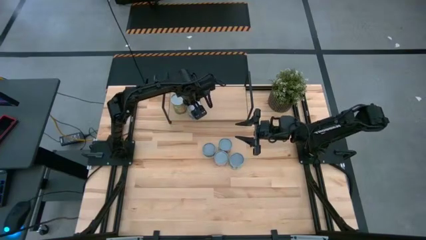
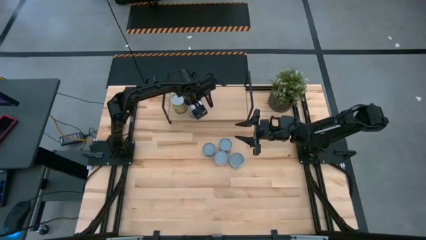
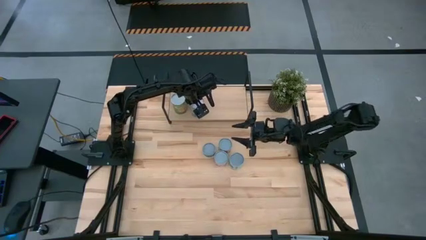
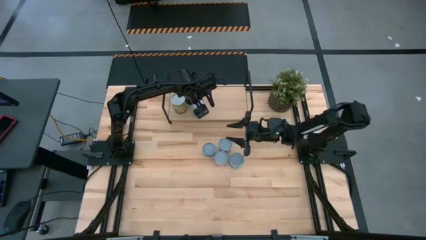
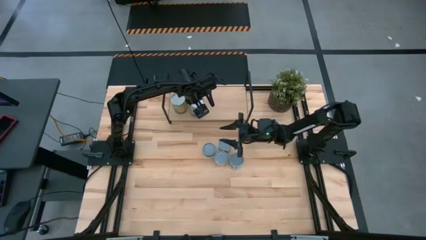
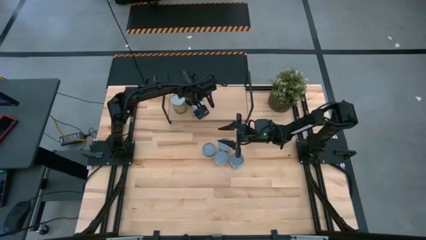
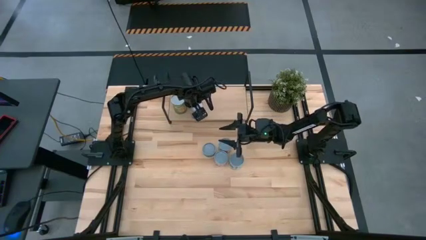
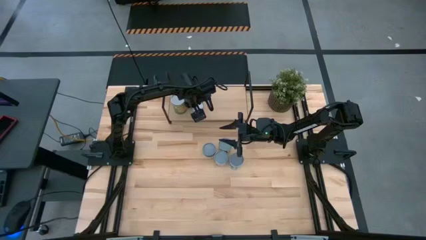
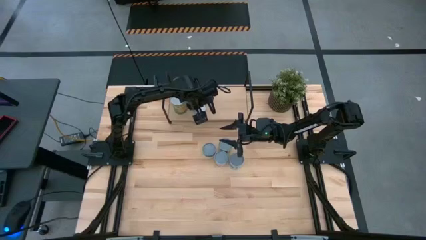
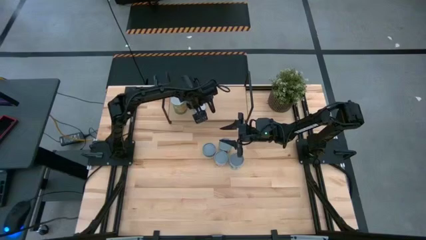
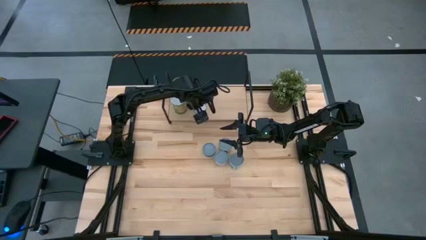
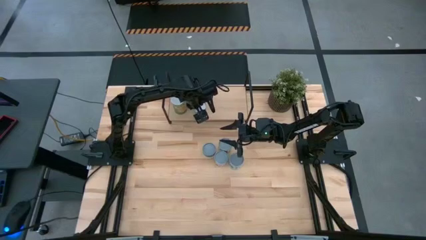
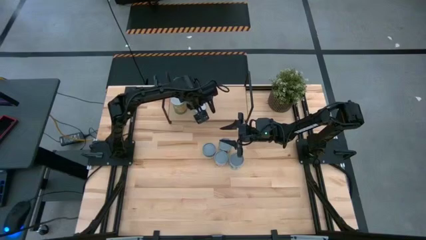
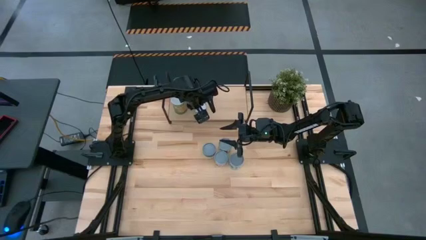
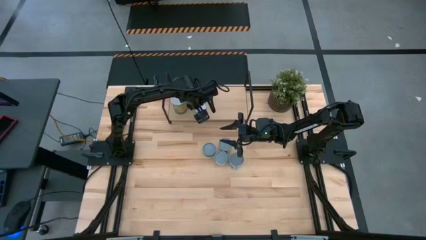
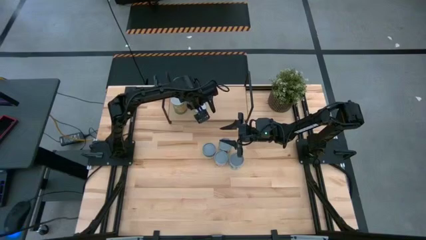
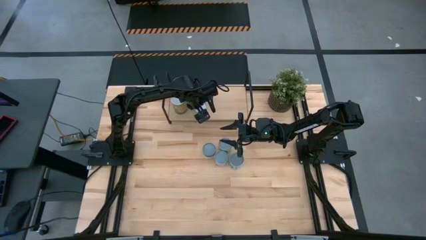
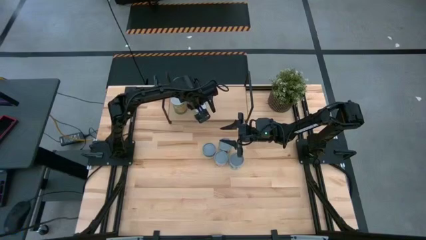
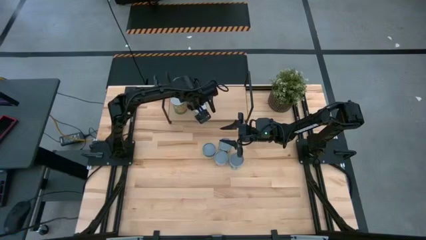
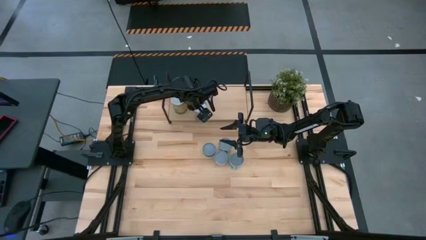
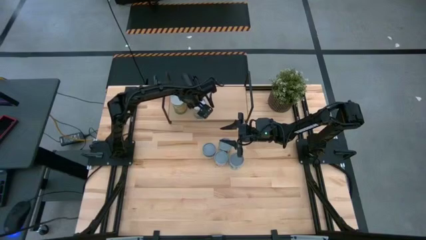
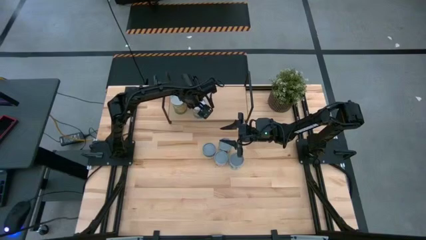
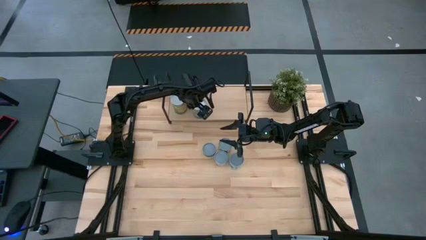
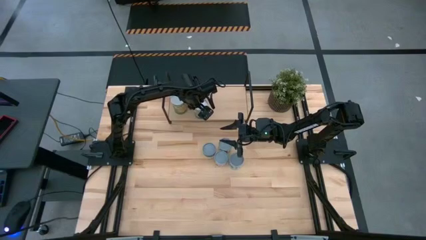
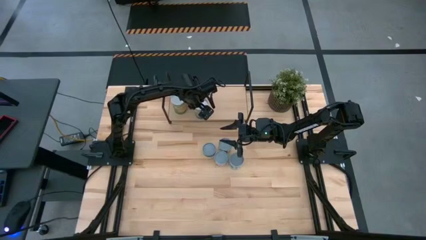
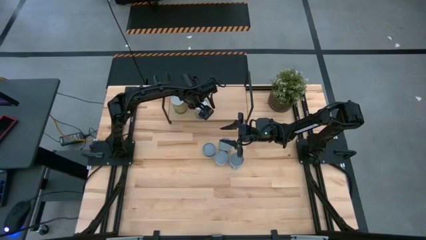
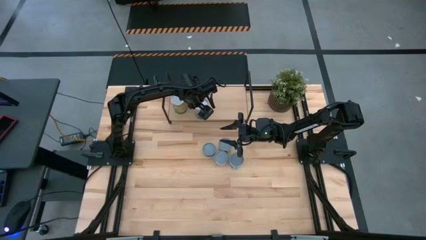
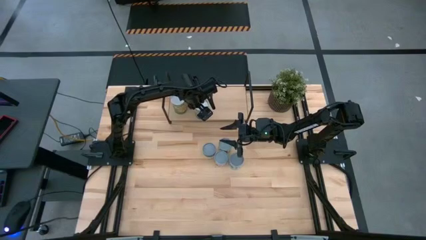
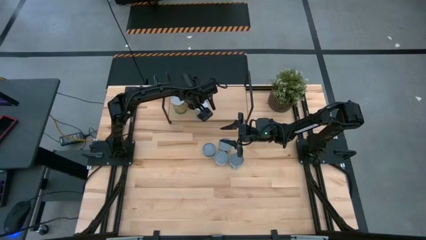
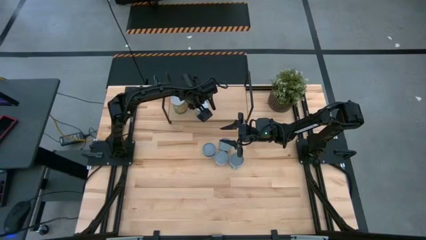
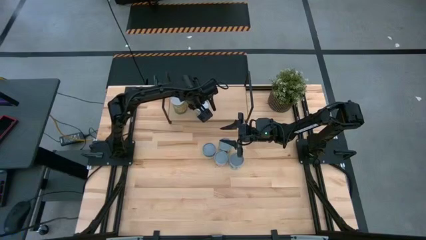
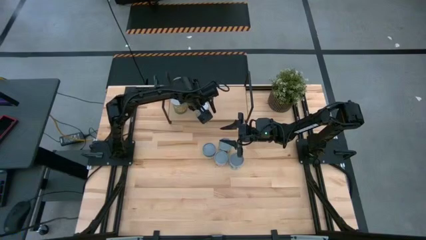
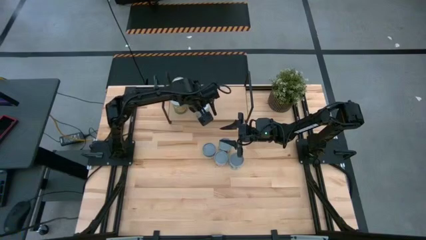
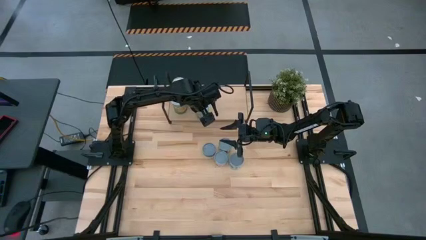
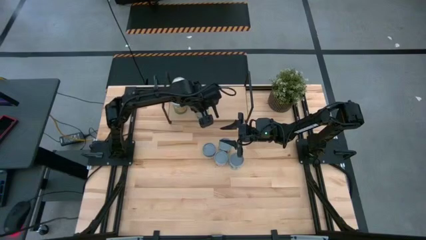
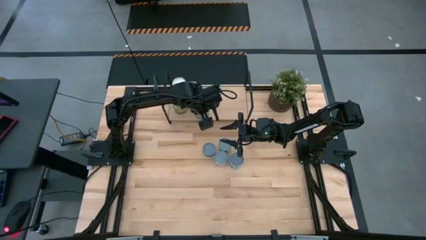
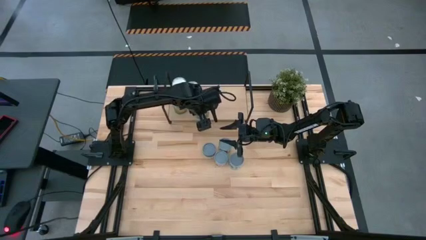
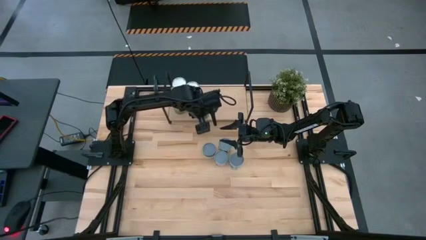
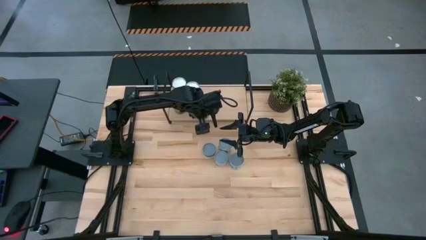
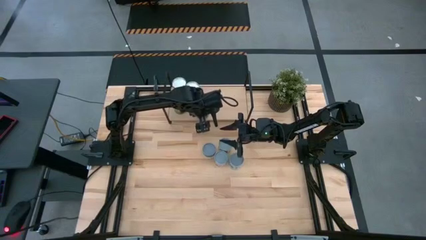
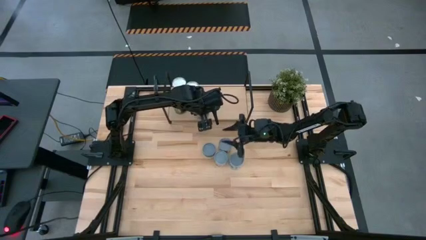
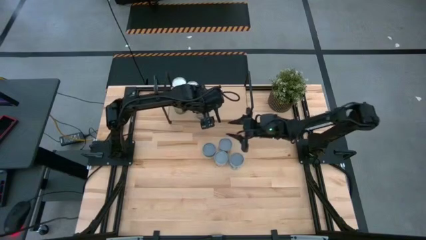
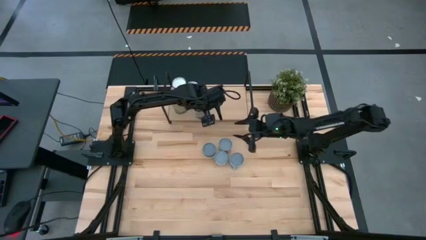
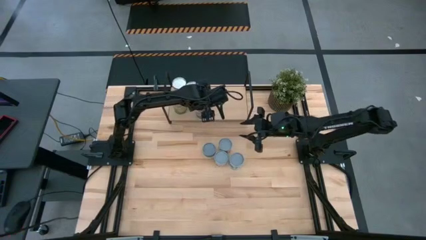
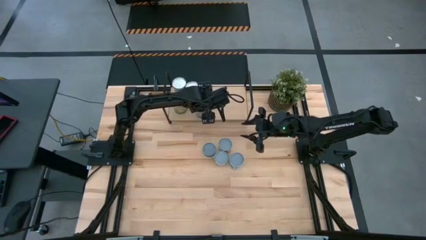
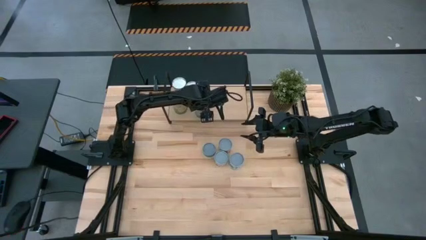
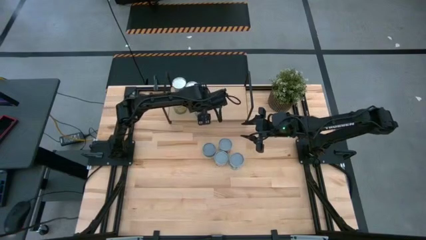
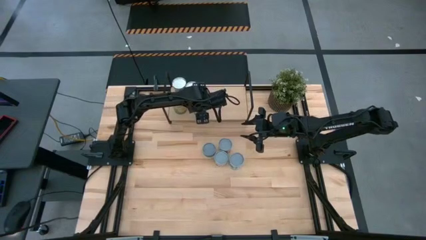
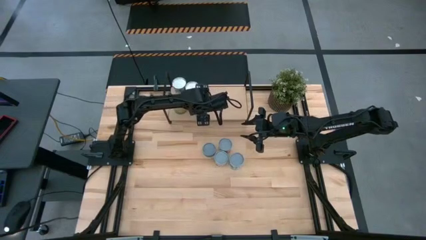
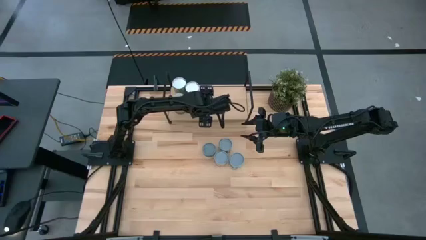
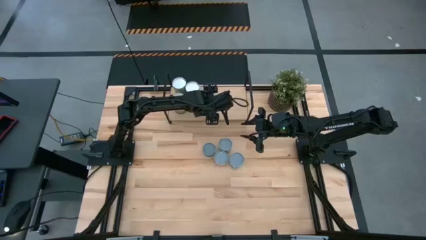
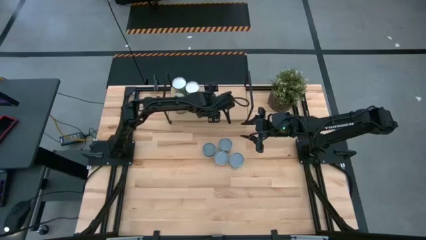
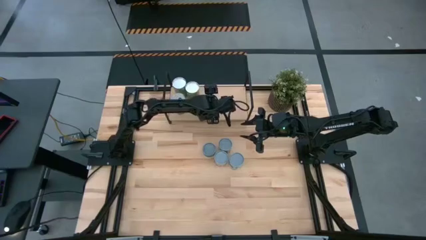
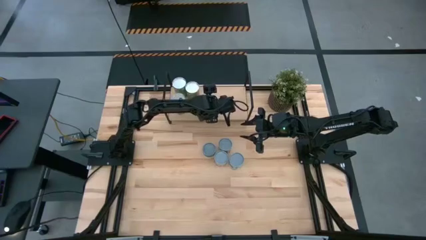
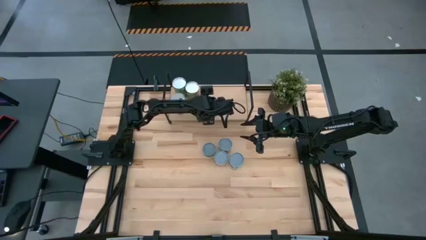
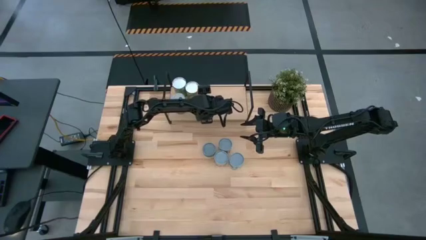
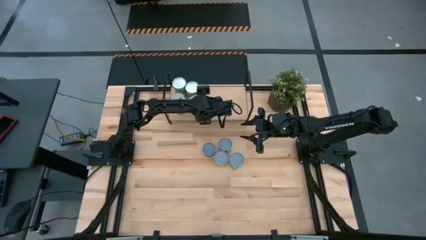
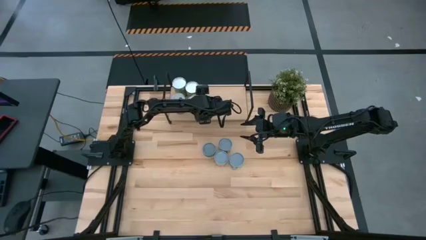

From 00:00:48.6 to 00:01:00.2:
Task: Pick and place cans onto a shelf
Put the canned peas on the shelf
